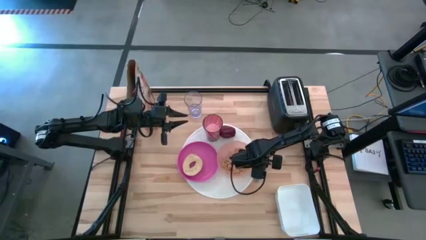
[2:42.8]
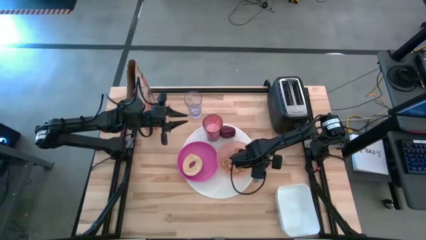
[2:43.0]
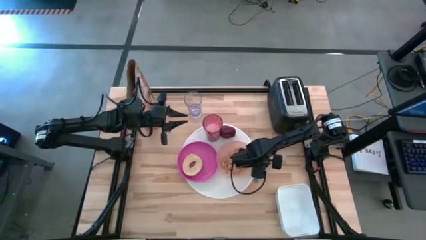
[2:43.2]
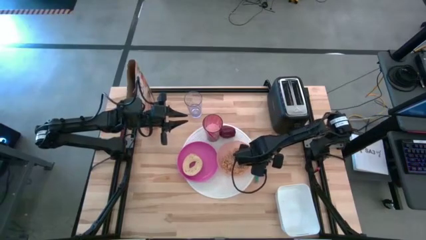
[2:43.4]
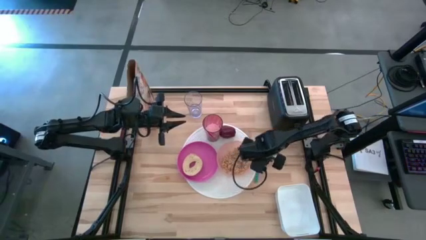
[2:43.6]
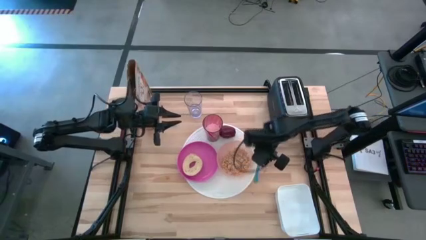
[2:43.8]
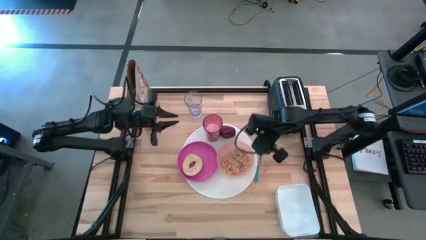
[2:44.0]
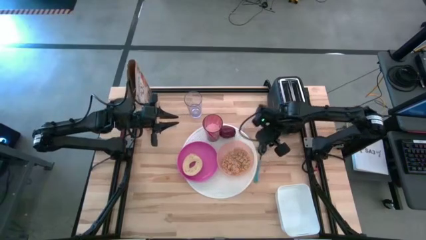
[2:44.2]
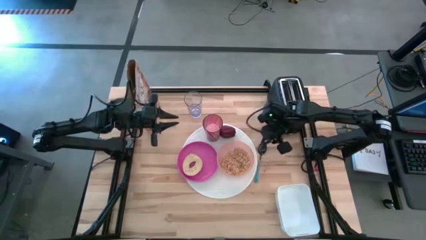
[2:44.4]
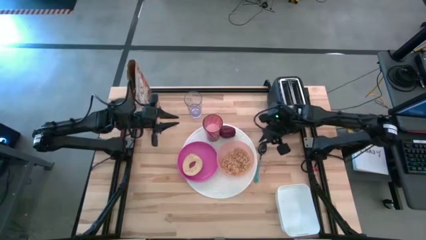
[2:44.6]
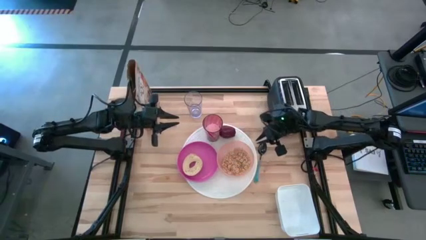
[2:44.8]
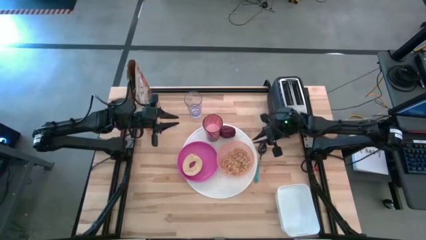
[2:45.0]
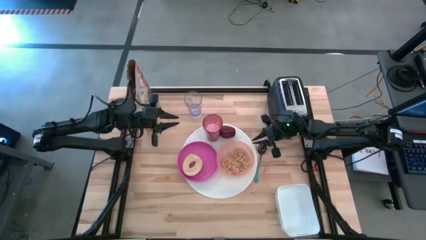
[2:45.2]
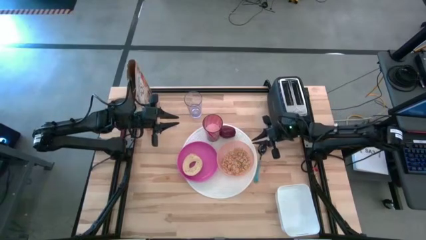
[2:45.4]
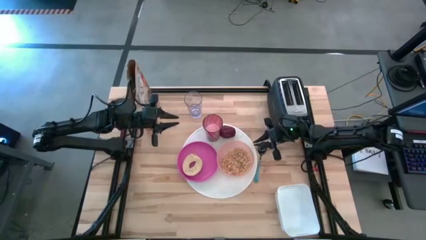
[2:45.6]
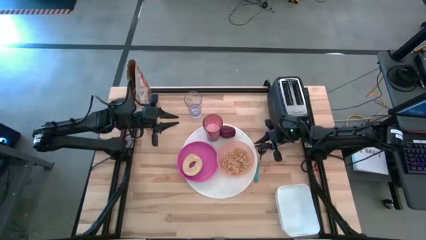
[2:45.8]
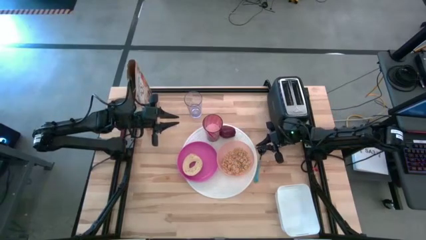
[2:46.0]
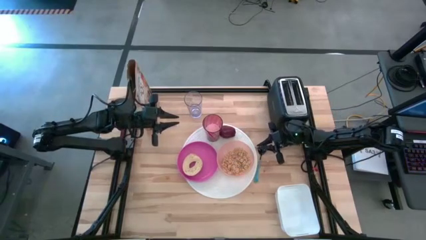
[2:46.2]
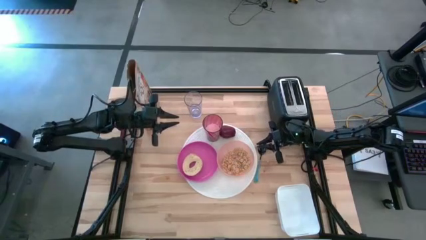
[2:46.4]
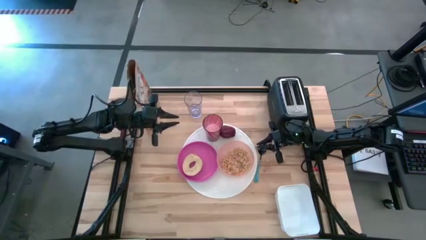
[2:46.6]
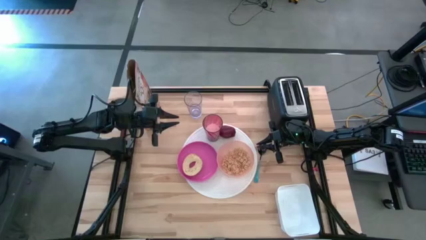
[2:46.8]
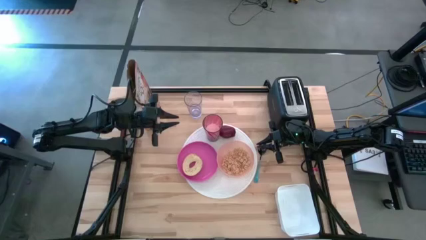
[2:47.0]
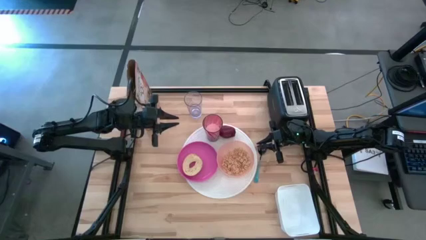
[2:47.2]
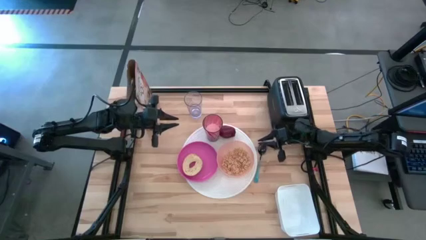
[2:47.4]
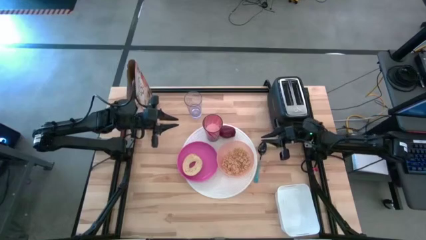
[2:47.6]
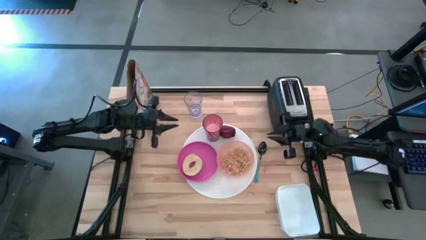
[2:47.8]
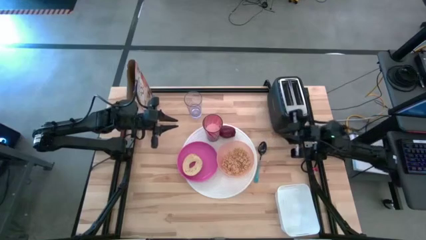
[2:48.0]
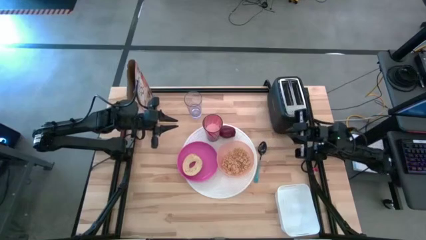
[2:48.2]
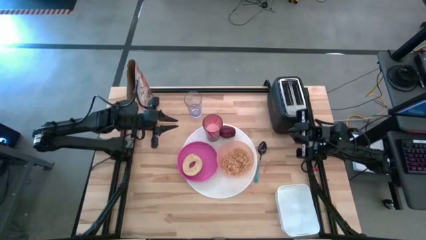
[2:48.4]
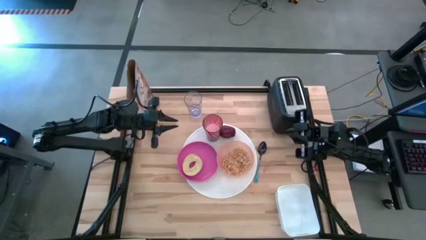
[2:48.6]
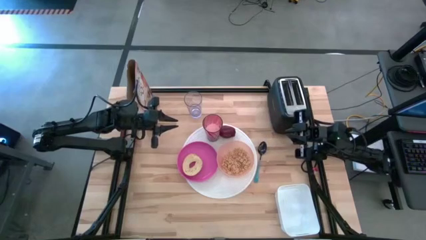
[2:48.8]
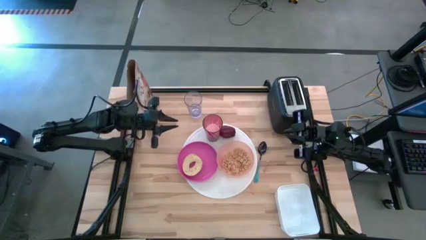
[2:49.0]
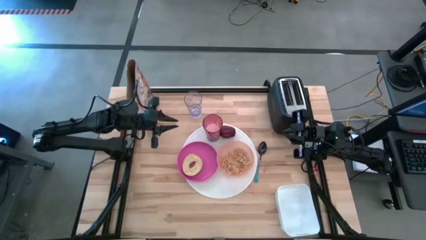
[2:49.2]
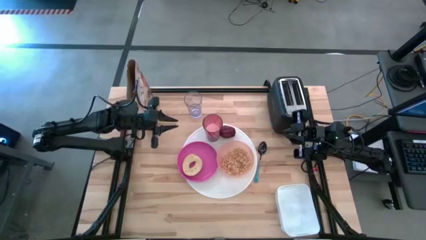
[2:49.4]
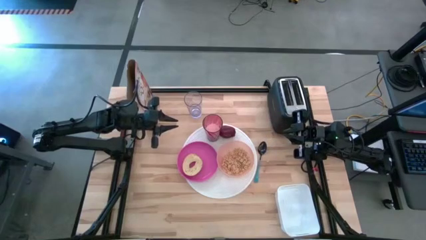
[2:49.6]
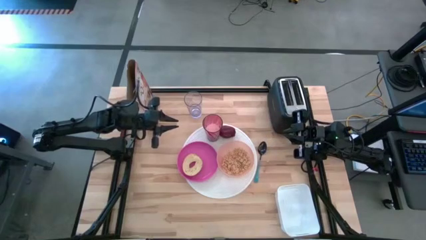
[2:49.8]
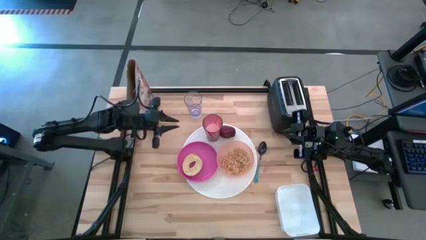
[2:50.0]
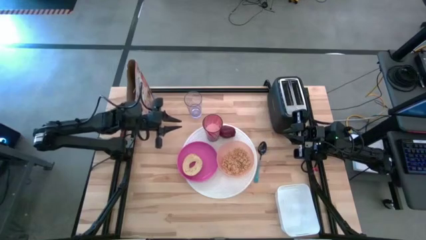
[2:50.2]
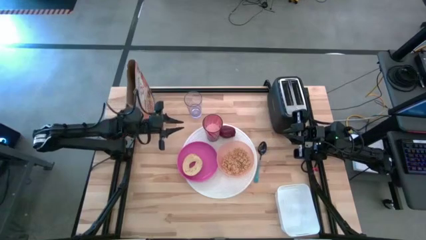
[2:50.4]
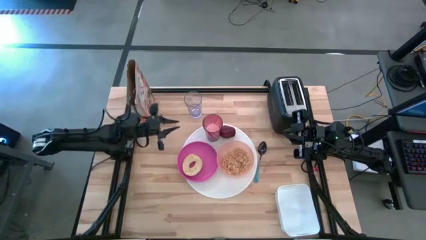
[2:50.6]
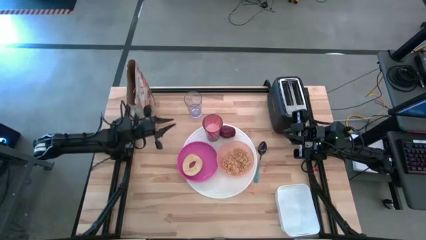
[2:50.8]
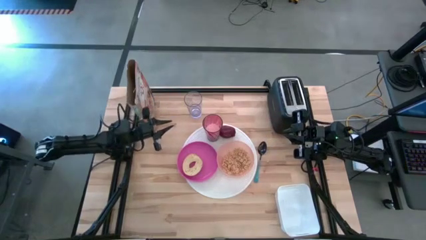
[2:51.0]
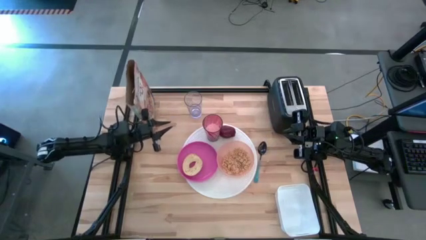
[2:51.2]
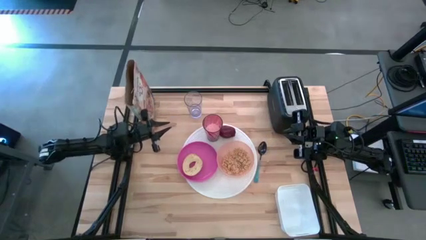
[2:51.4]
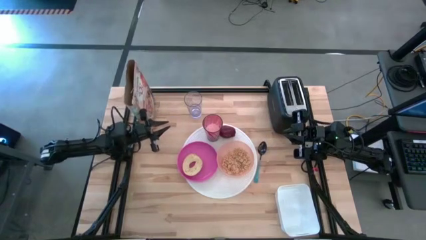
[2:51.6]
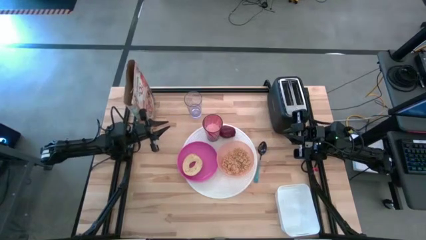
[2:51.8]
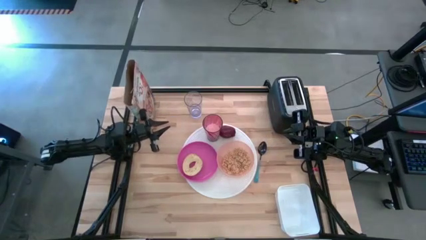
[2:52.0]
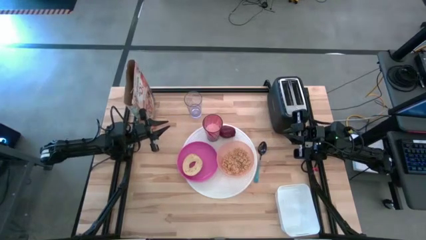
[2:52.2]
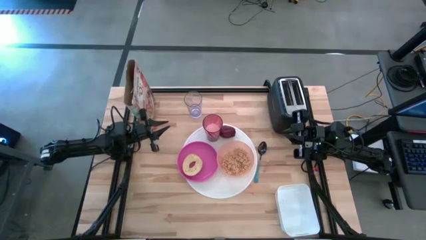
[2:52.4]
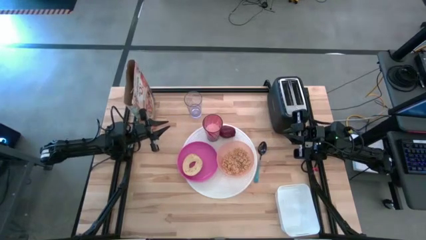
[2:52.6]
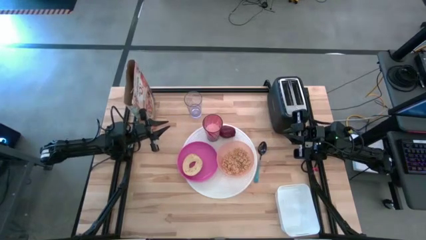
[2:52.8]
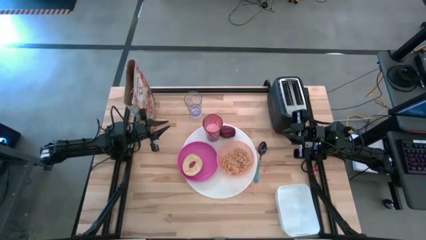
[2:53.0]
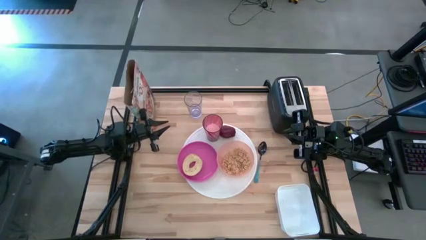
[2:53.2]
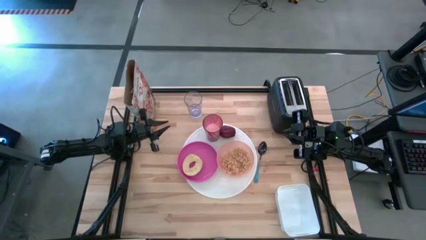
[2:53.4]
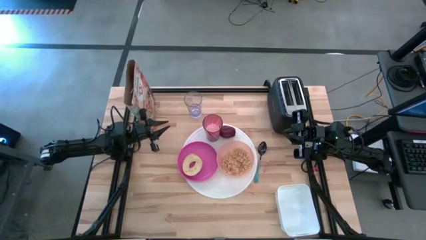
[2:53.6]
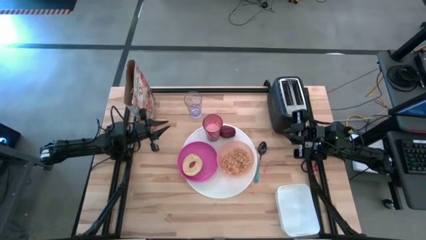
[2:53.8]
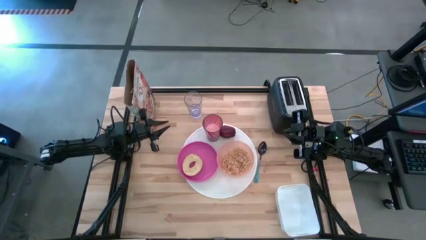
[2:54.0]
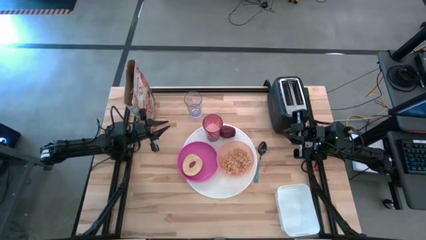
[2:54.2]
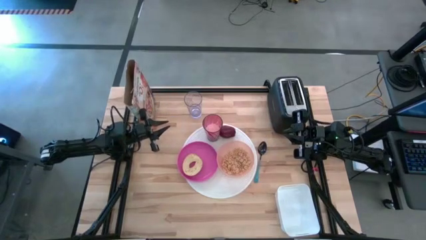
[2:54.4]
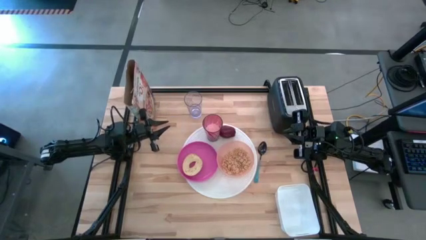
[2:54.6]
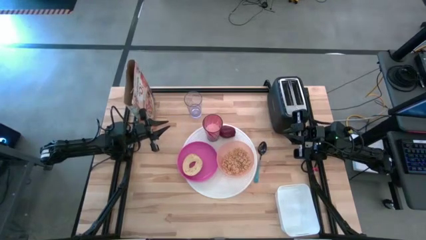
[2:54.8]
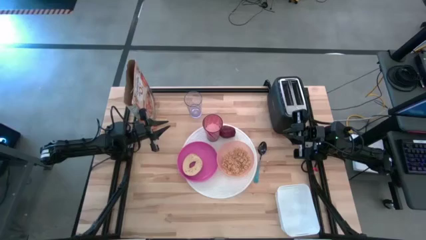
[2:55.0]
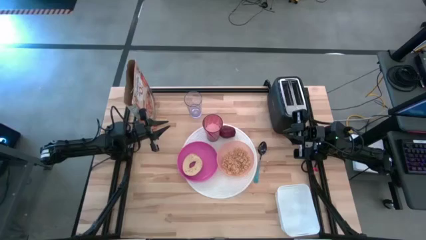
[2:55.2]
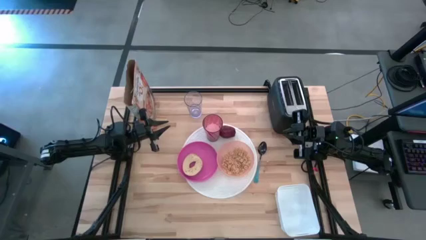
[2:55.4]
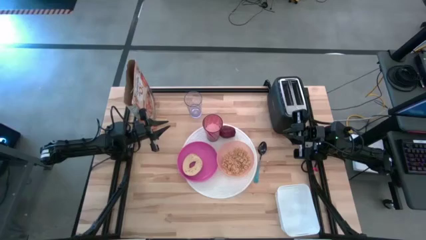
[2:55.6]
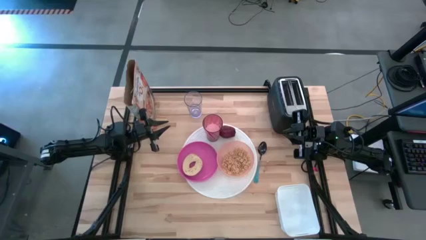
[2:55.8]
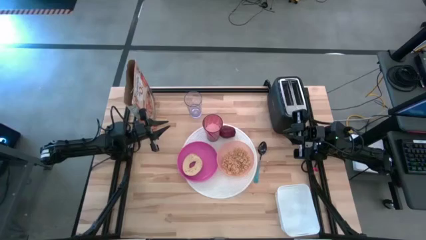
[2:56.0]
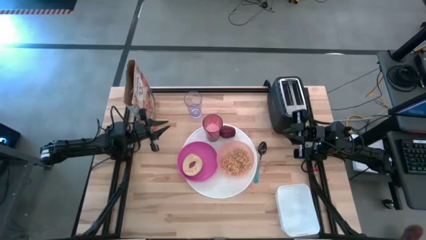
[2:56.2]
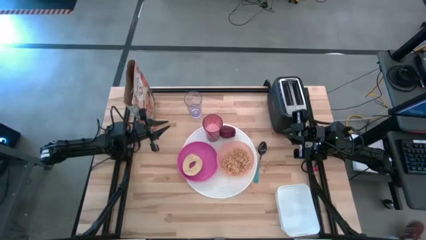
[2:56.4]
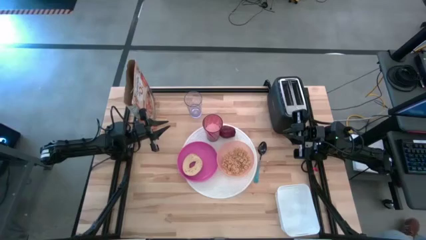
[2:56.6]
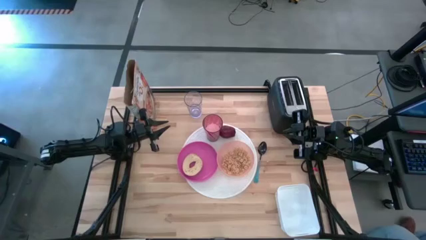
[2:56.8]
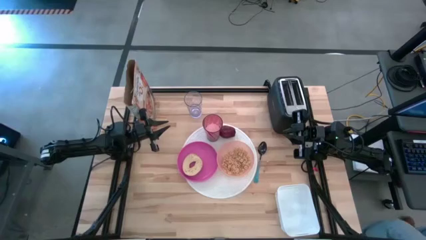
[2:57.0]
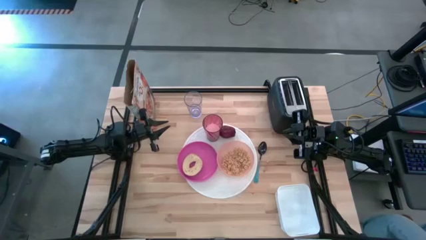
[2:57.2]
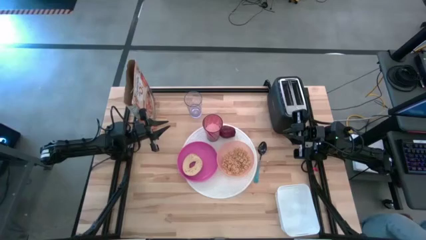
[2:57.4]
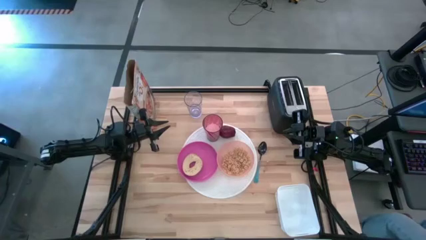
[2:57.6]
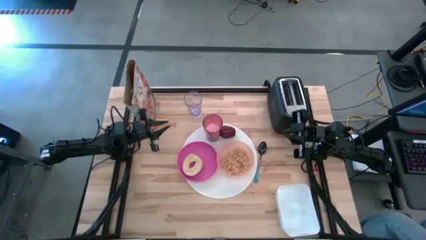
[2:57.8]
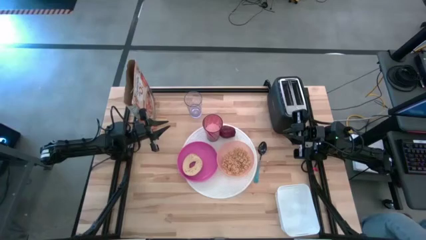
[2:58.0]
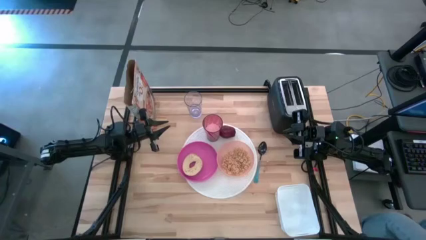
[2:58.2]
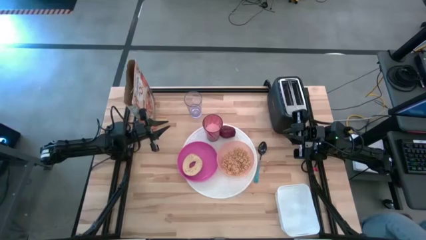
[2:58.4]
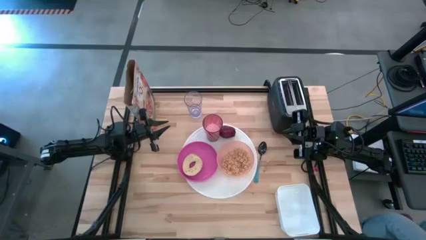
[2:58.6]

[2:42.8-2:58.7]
Task: Arrange a breakfast setting
Return to Home Position
